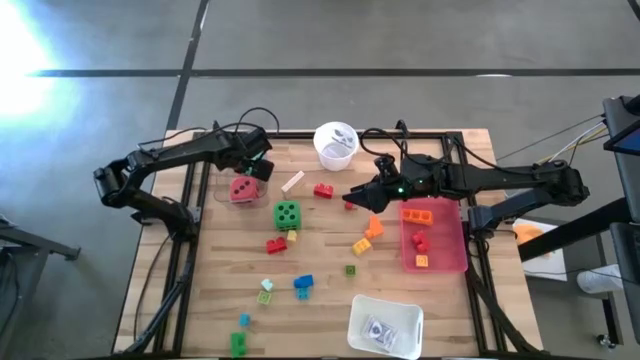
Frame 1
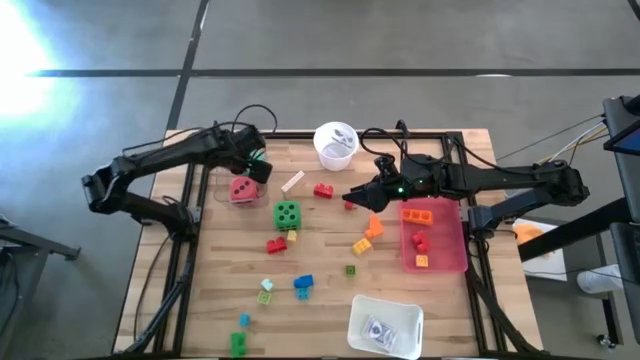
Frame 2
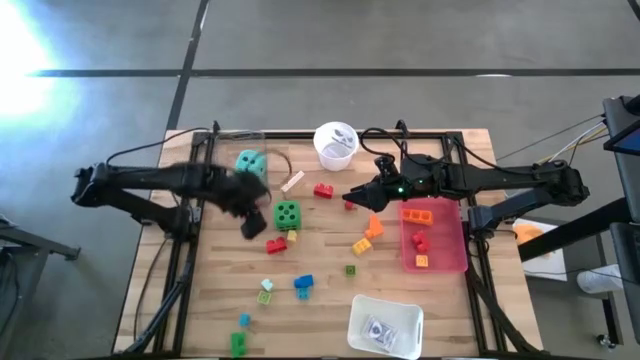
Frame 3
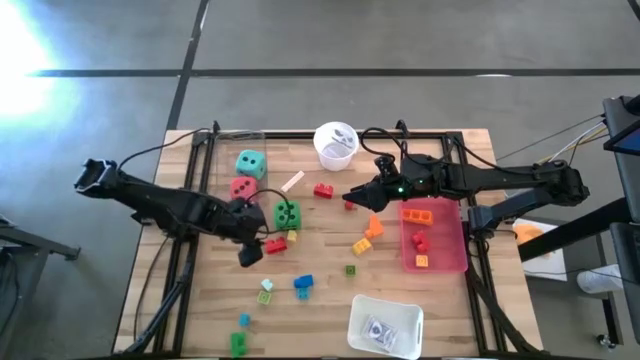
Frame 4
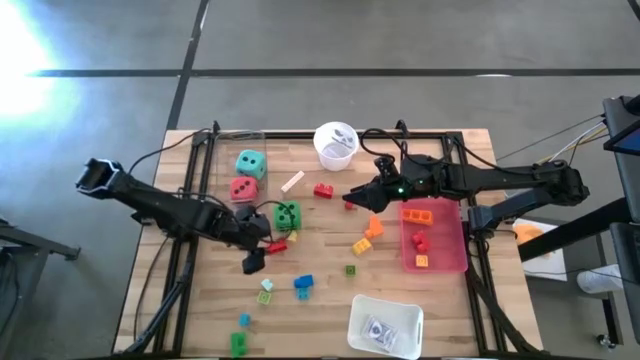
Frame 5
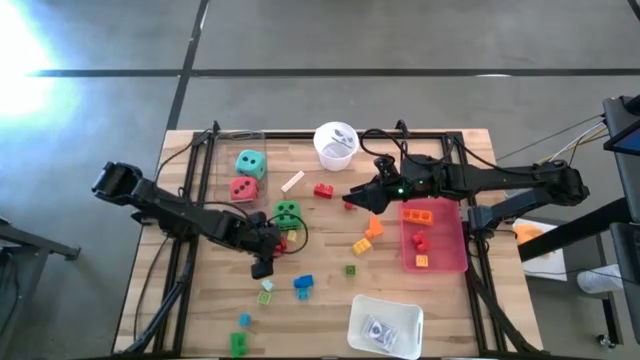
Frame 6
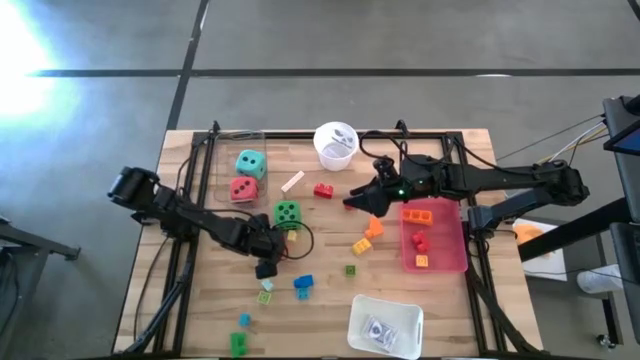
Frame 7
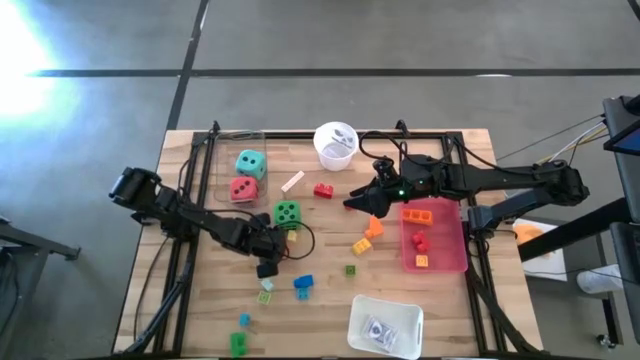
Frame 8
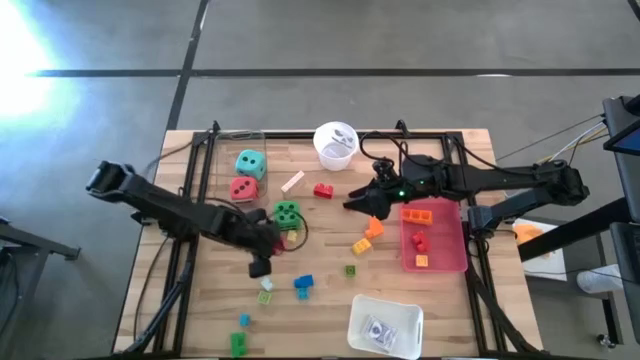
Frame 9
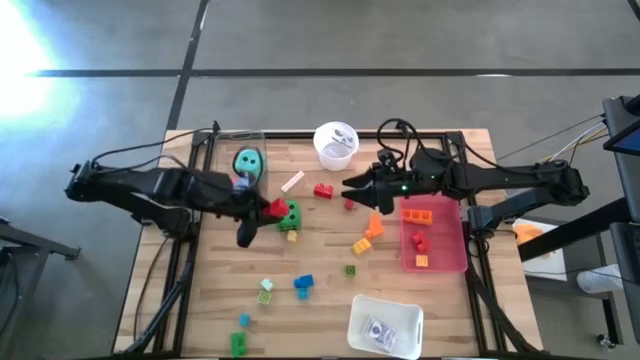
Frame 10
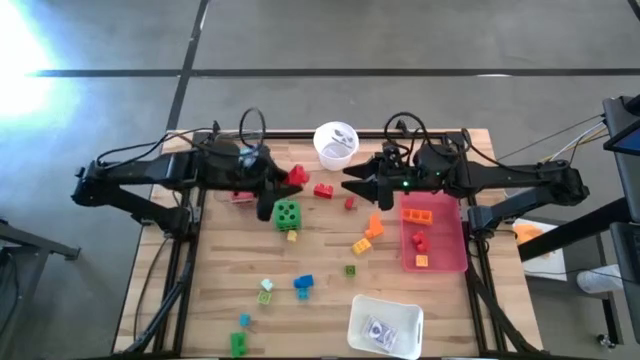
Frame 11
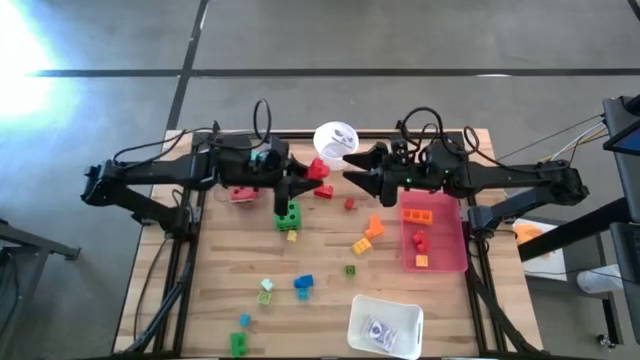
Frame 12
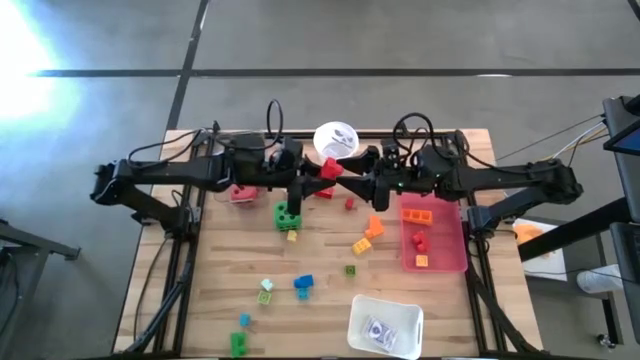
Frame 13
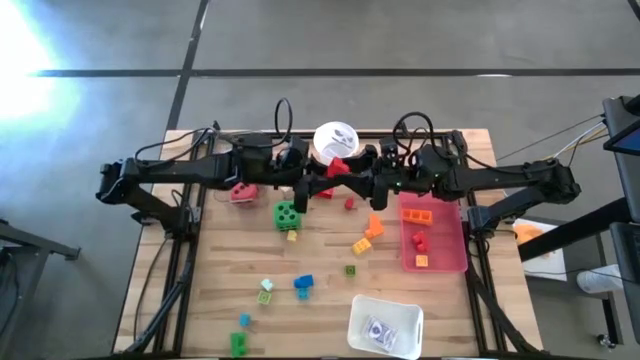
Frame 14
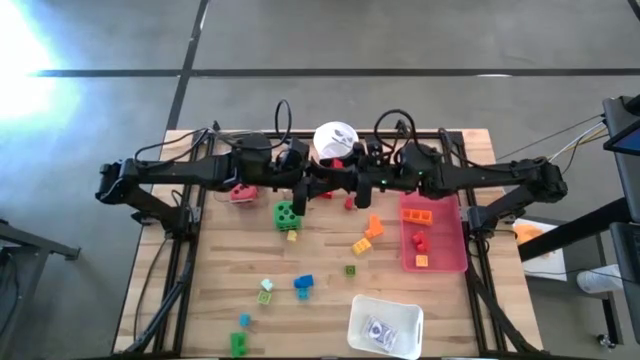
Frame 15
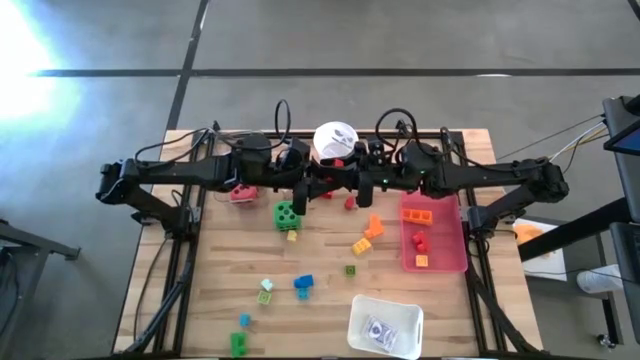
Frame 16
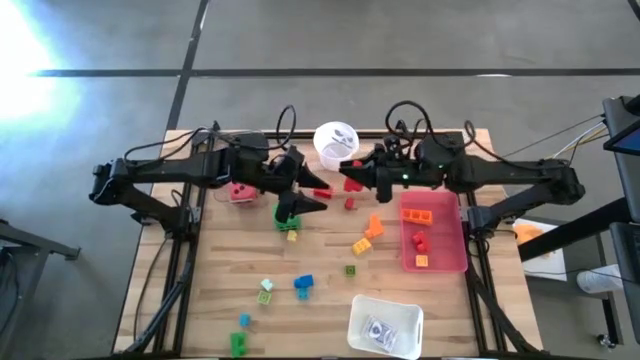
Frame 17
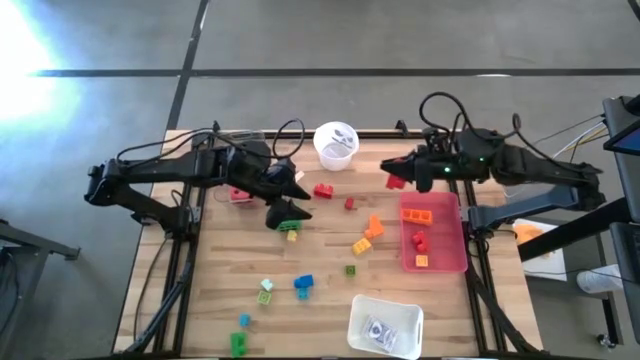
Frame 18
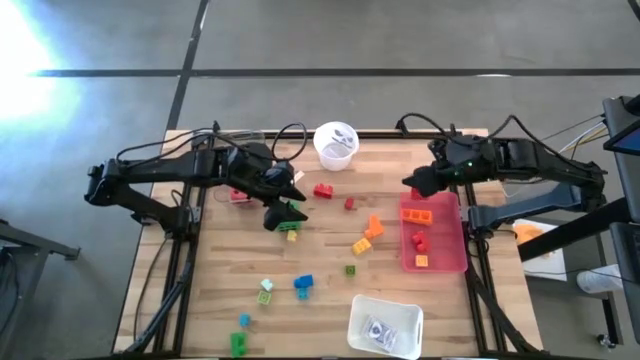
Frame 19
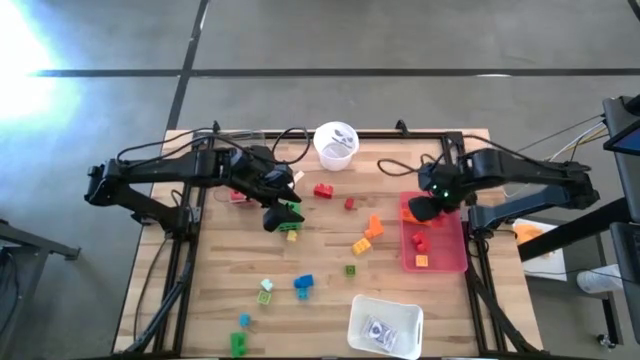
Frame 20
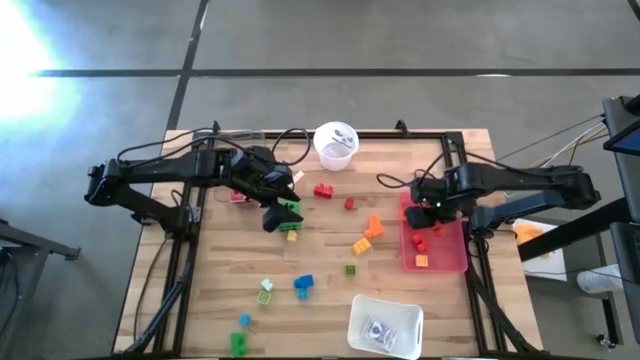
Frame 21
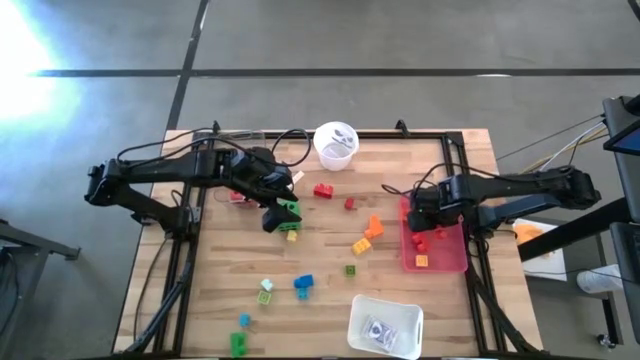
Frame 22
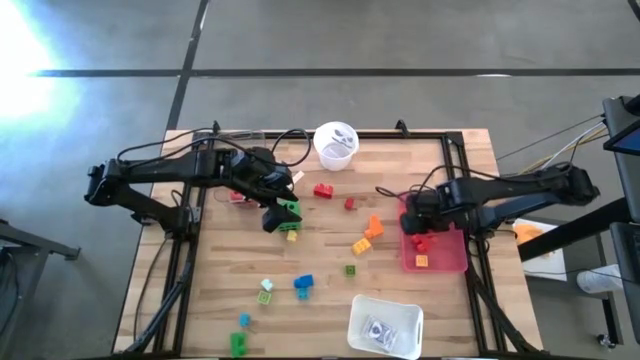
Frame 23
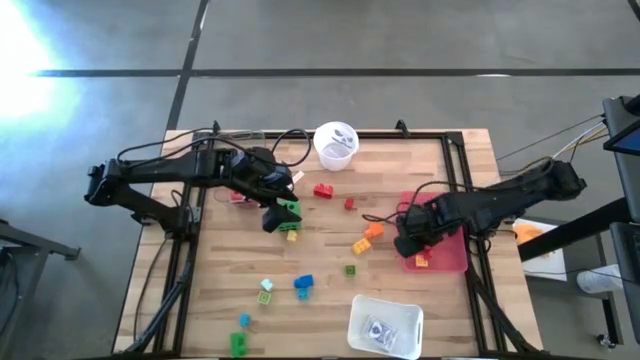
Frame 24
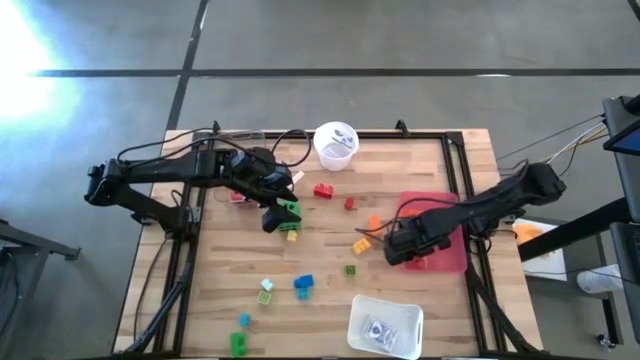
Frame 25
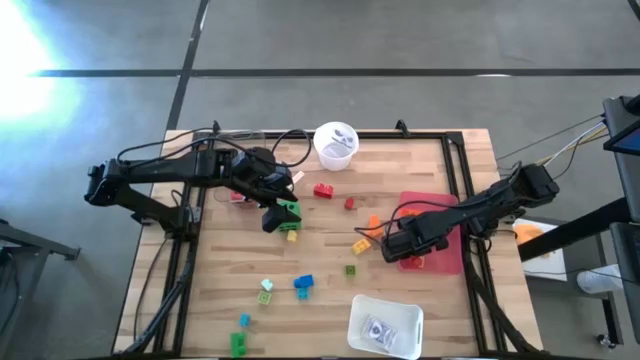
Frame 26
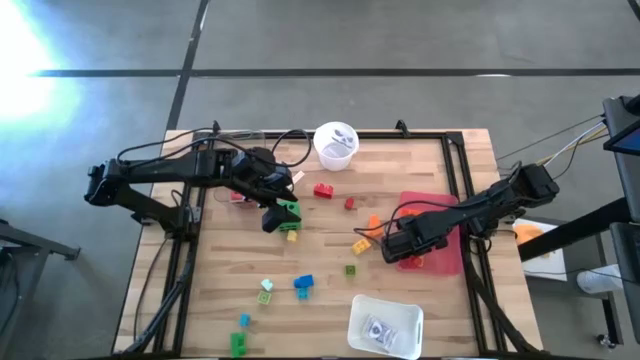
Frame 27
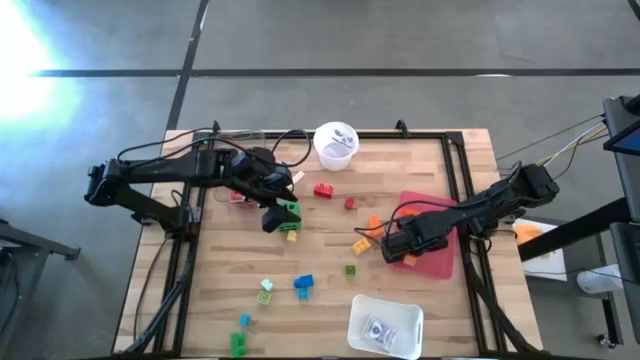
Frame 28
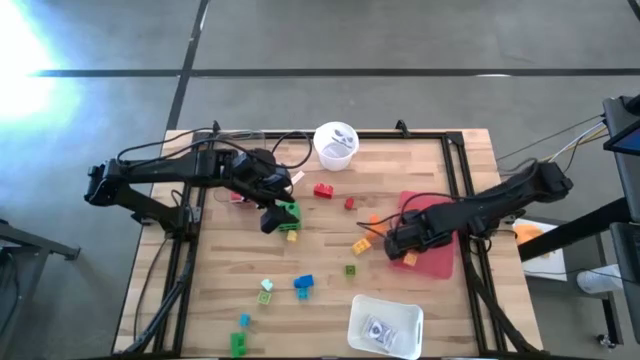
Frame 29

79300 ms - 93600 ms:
Task: Pick & Place Toys
Put the red game piece into the pink bin

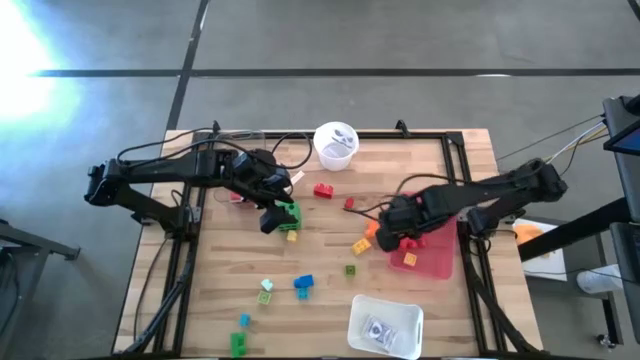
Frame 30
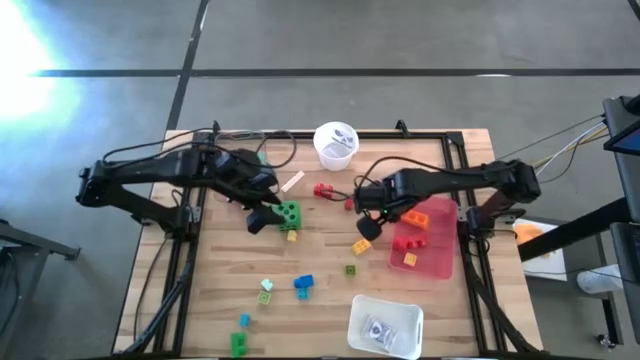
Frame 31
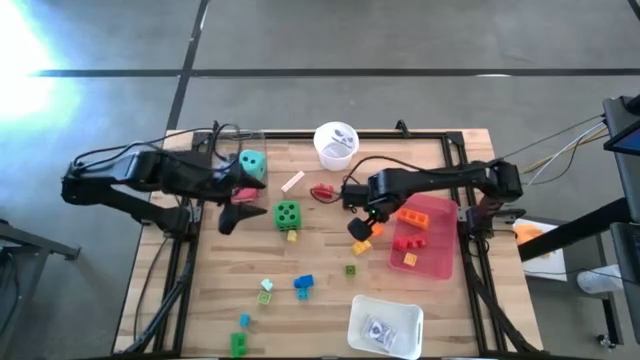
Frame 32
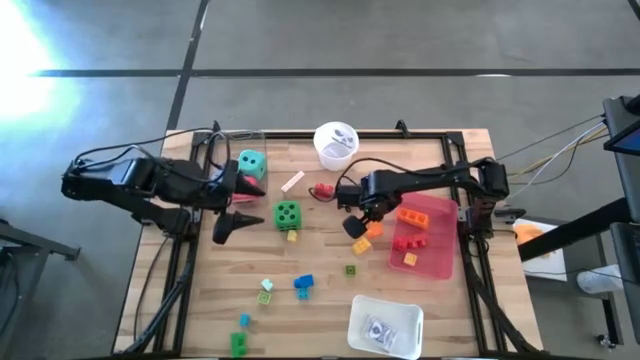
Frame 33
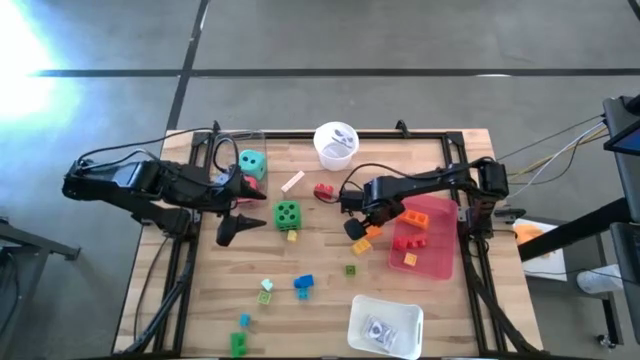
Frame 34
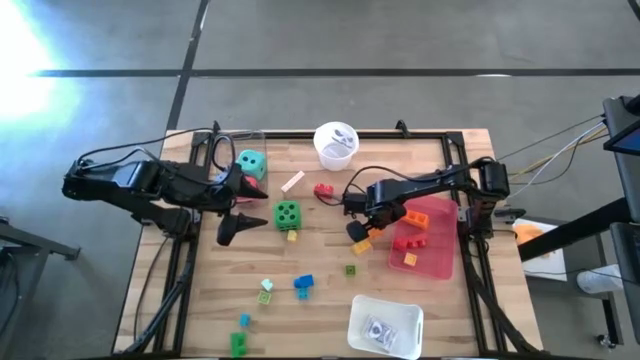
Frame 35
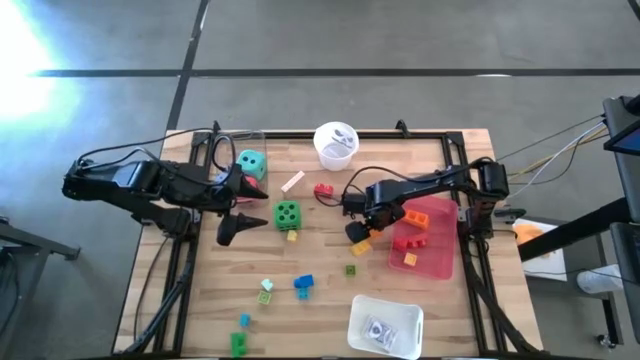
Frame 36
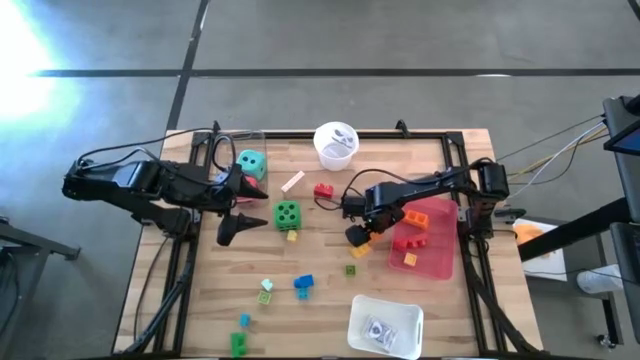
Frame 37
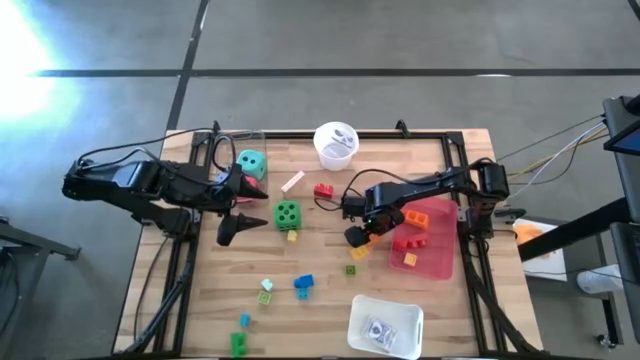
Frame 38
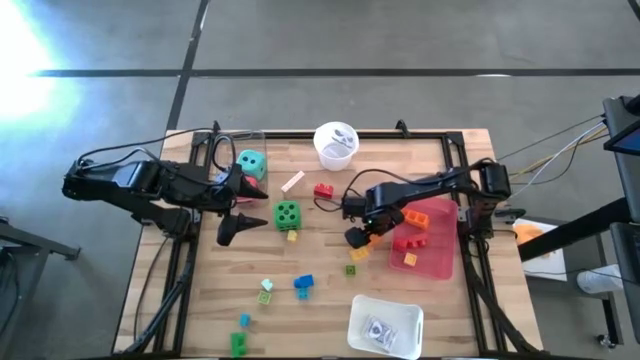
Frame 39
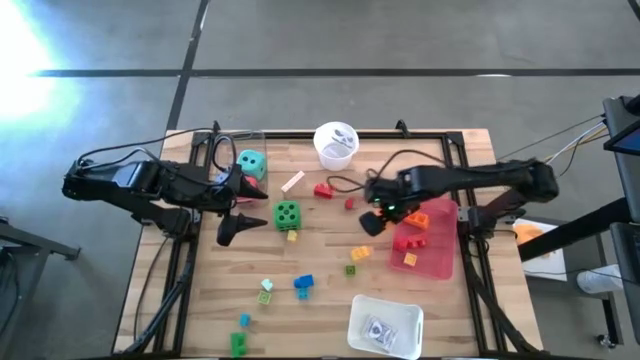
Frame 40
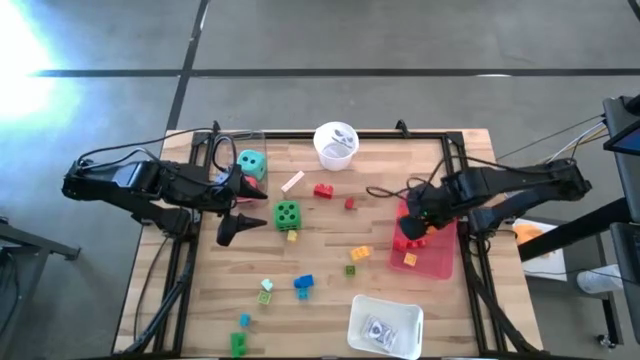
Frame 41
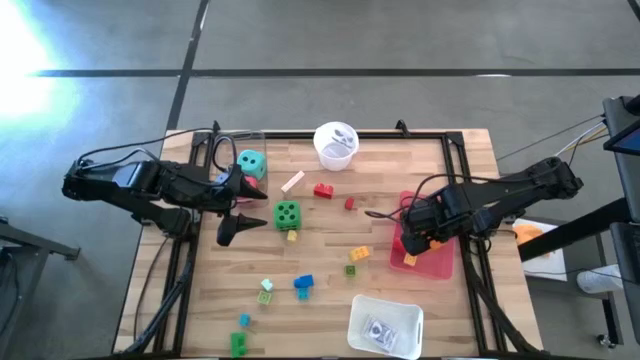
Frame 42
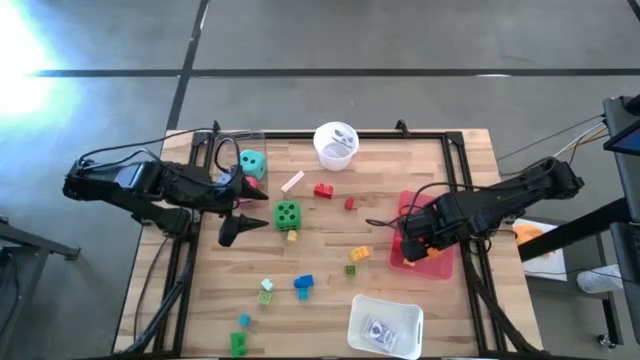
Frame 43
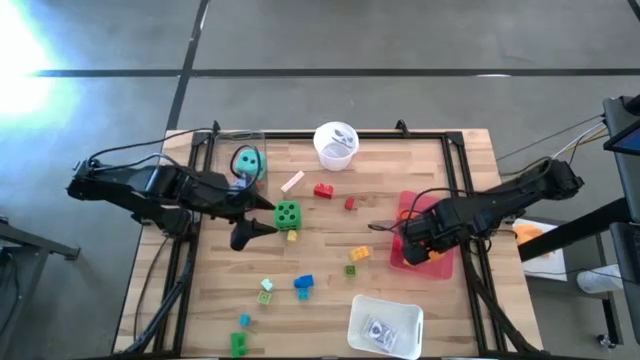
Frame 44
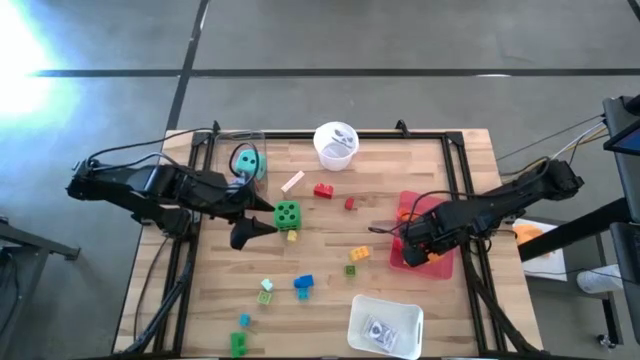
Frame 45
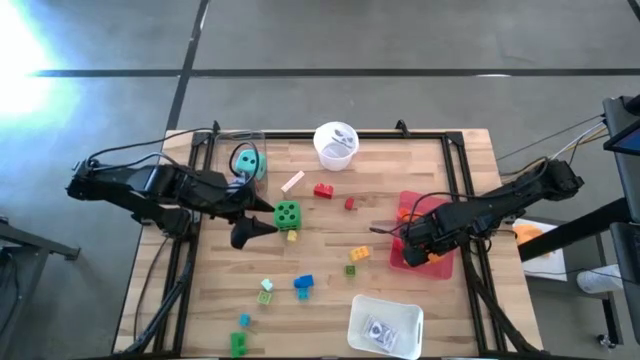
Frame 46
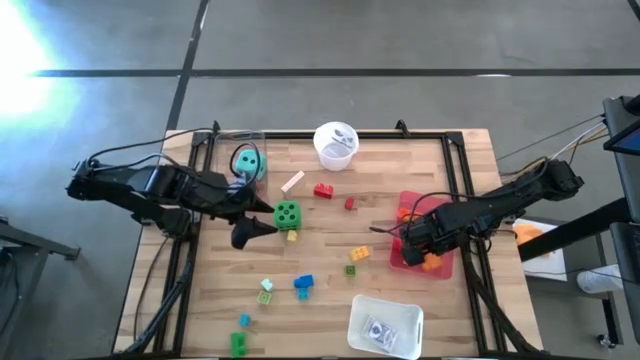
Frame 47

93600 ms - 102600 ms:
Put the orange game piece into the pink bin
